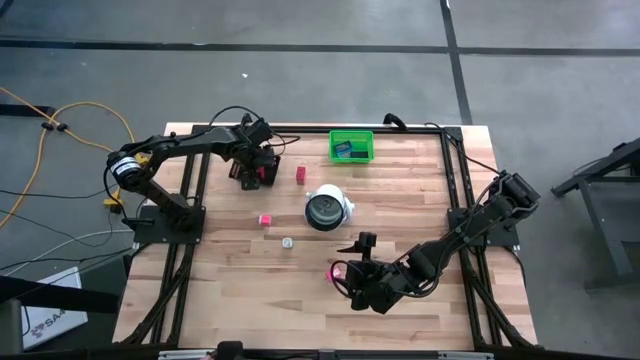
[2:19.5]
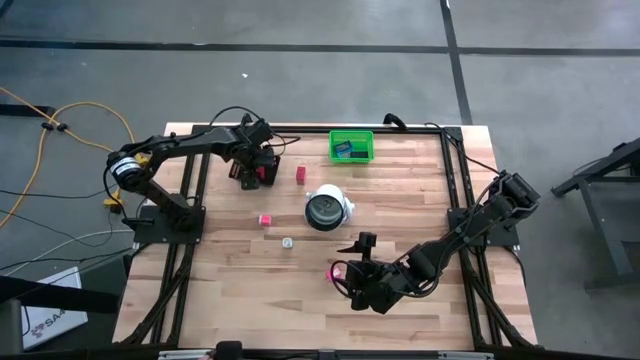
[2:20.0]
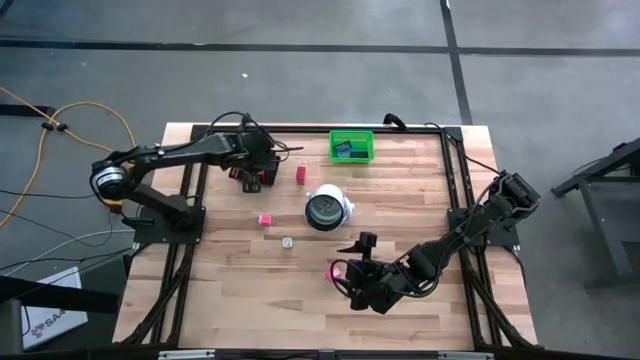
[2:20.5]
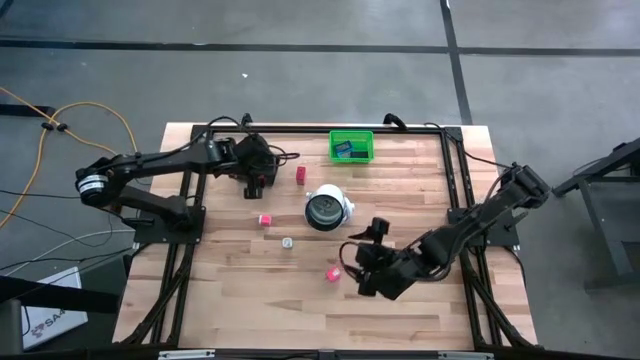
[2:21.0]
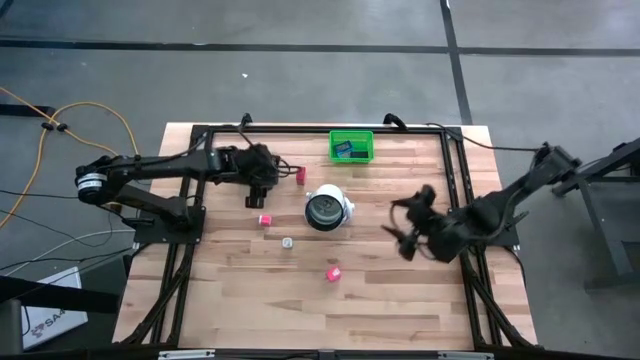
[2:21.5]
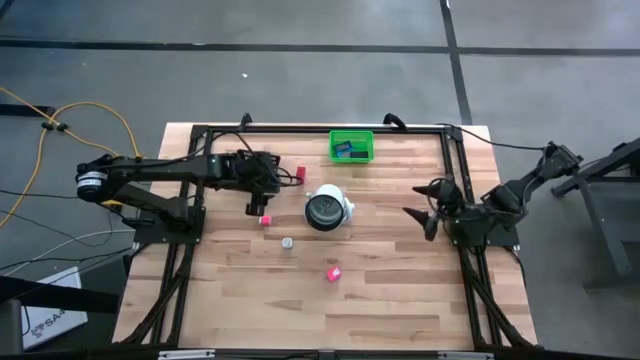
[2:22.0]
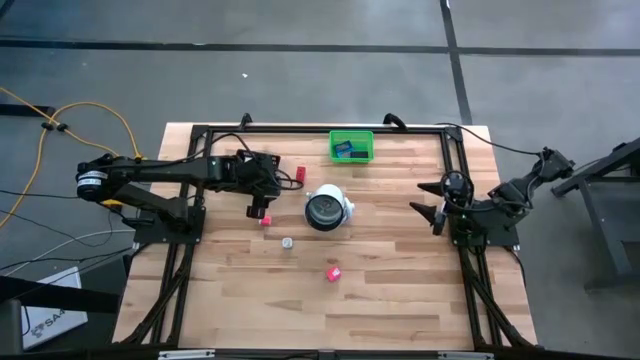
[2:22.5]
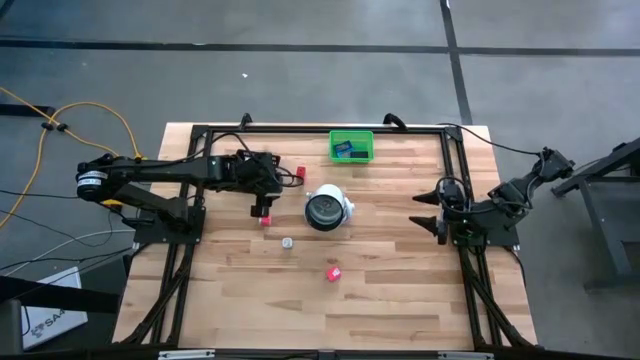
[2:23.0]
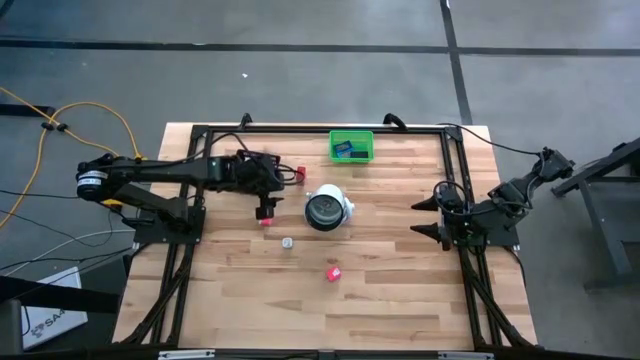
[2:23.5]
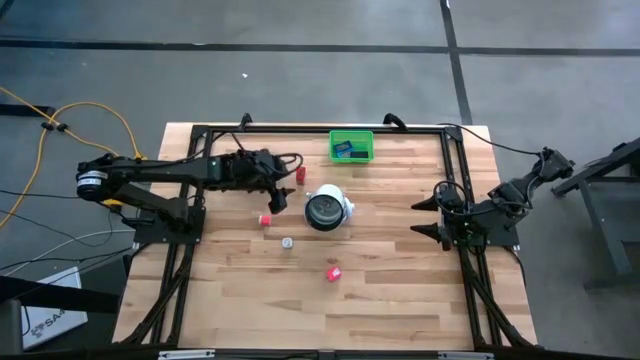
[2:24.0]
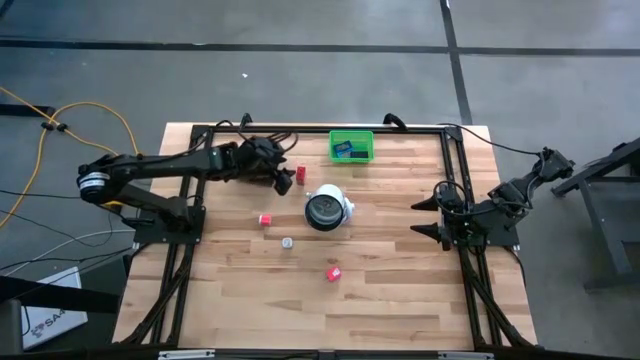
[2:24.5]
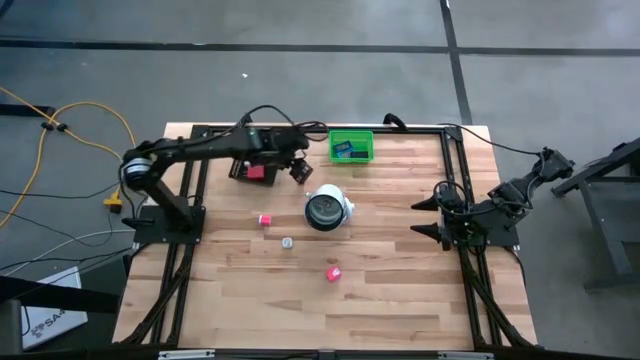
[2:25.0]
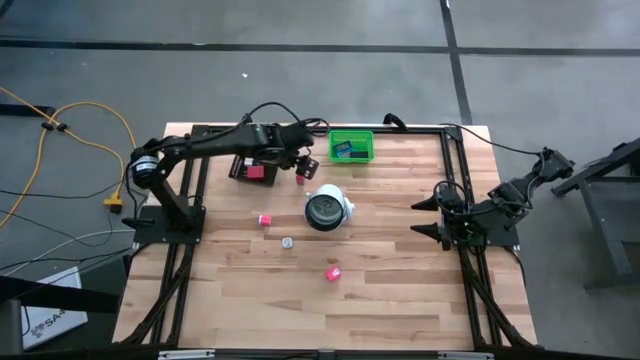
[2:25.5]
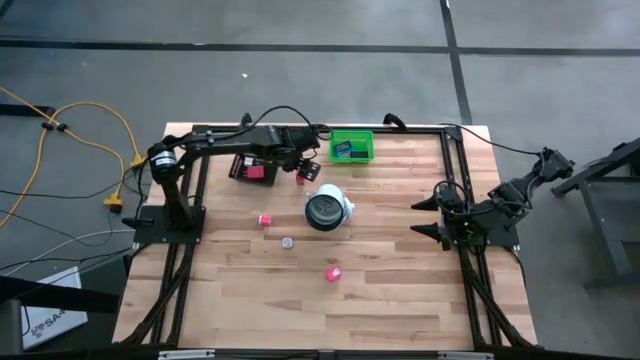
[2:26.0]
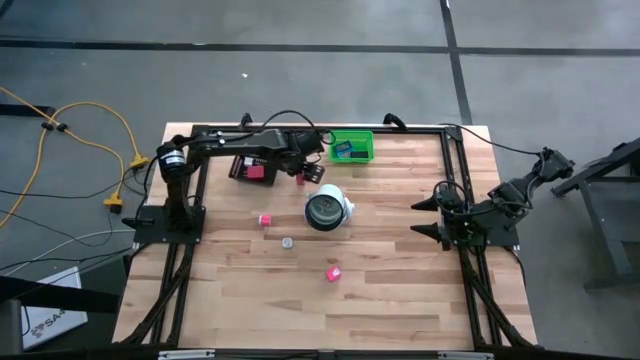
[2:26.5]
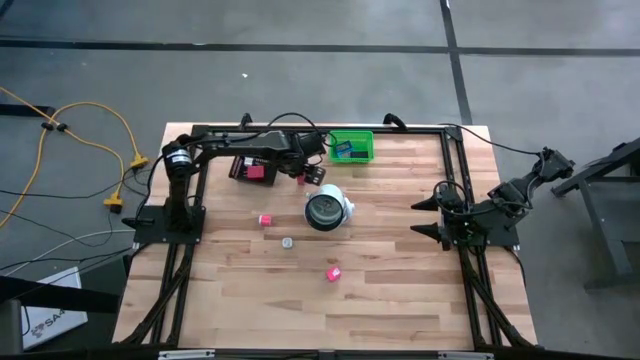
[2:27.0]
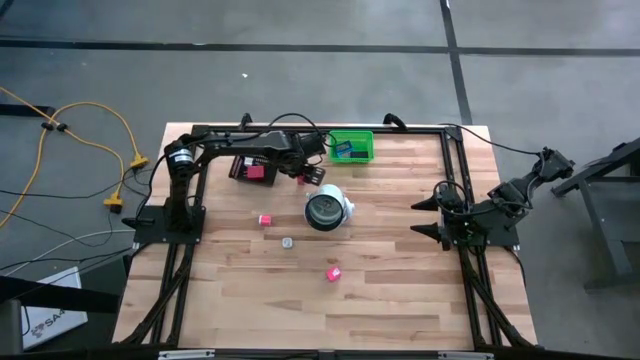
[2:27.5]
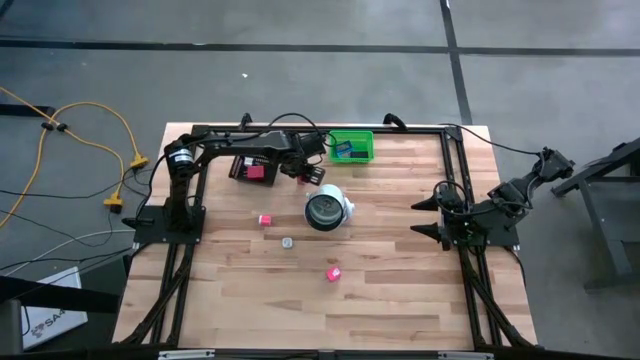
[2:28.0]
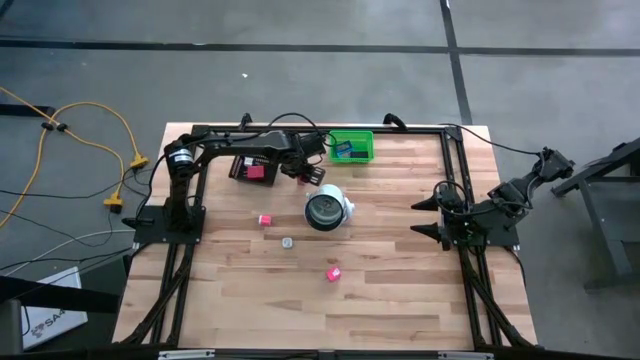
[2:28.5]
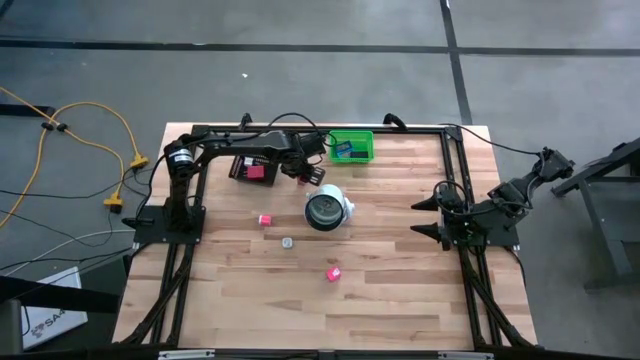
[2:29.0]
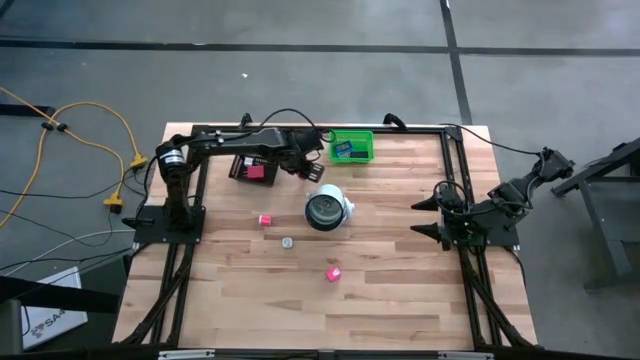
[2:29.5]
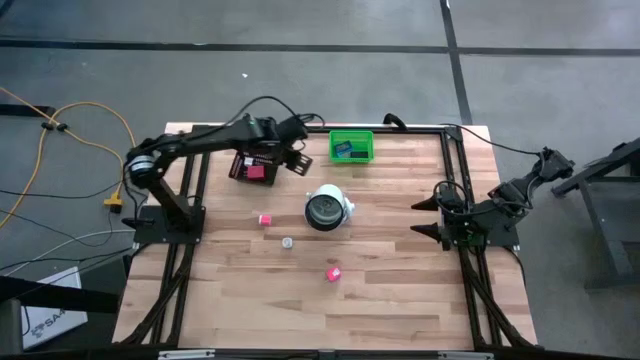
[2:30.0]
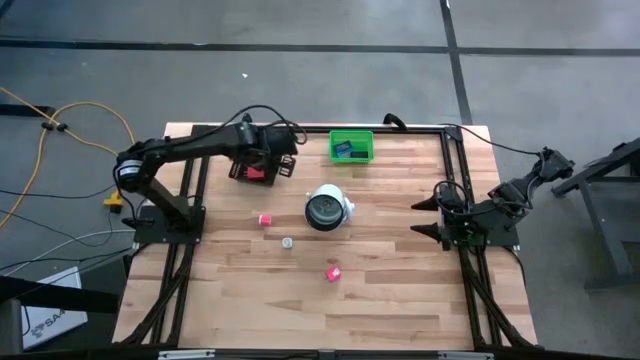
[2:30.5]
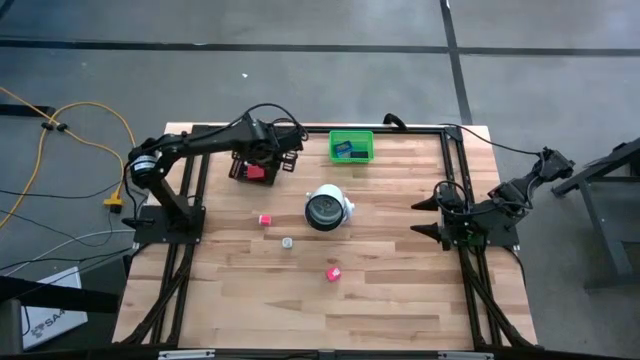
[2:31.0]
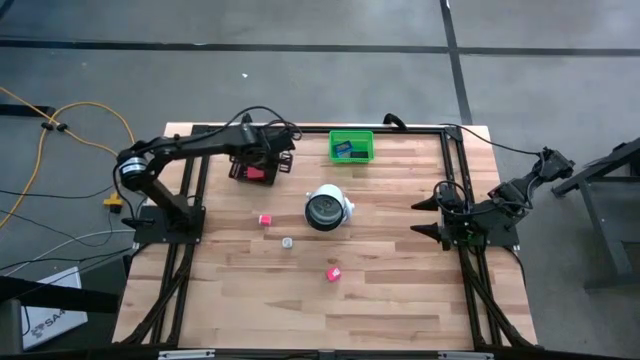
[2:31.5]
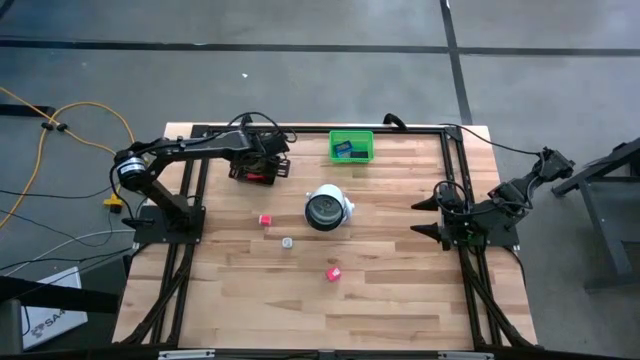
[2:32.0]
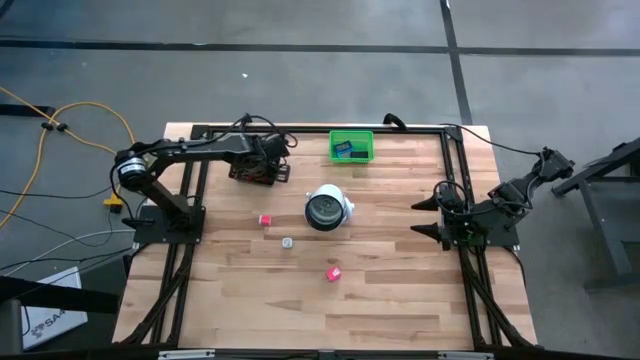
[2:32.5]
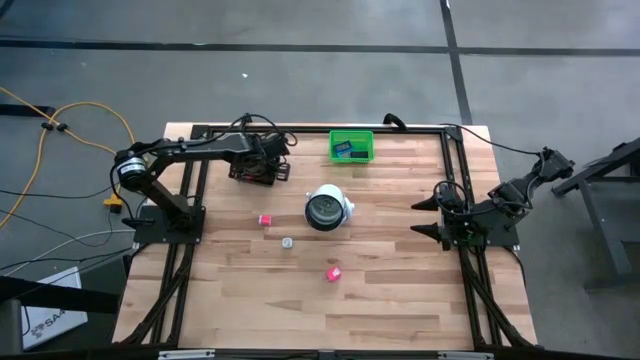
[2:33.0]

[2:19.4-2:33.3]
Task: Pick & Place Office items
Put the red charger adapter into the black bin

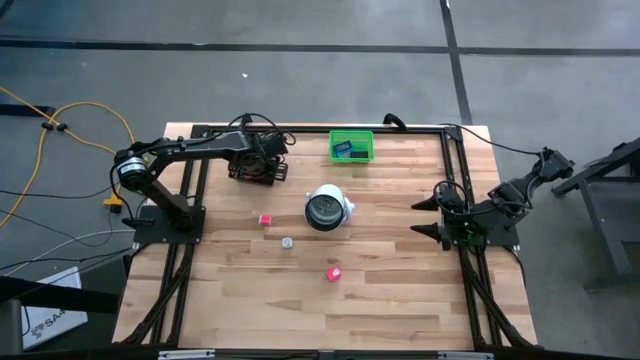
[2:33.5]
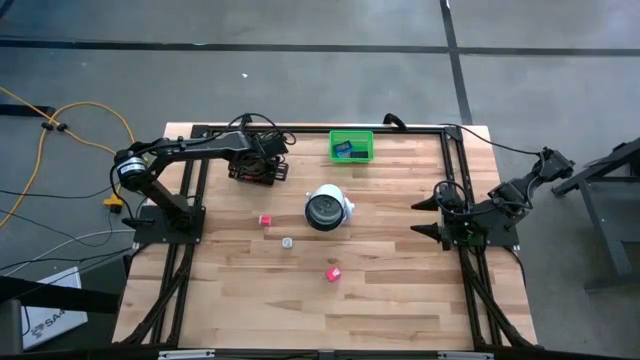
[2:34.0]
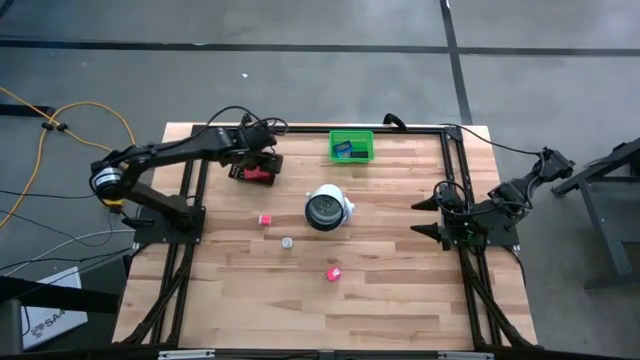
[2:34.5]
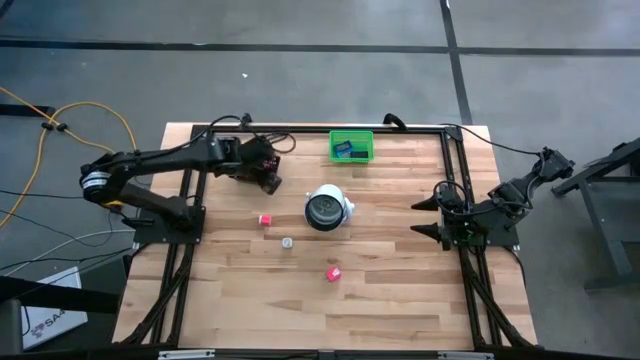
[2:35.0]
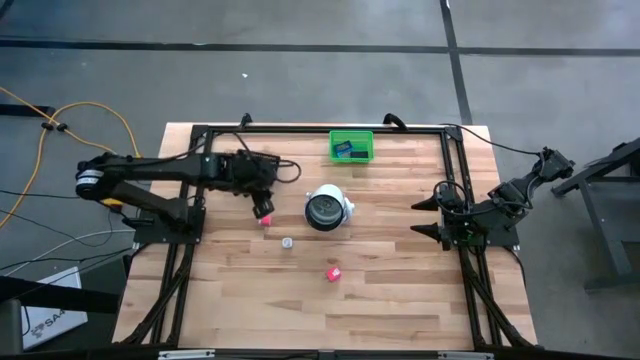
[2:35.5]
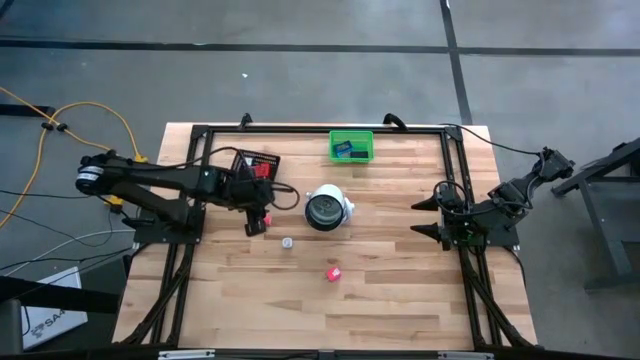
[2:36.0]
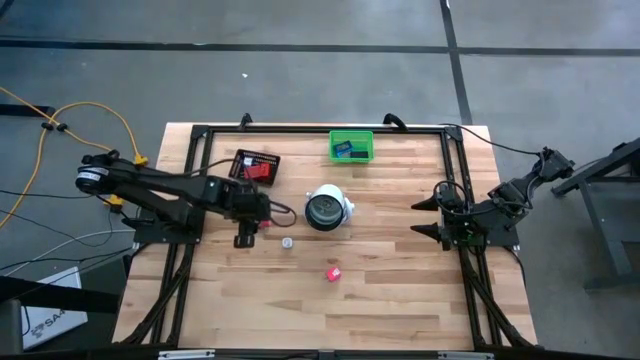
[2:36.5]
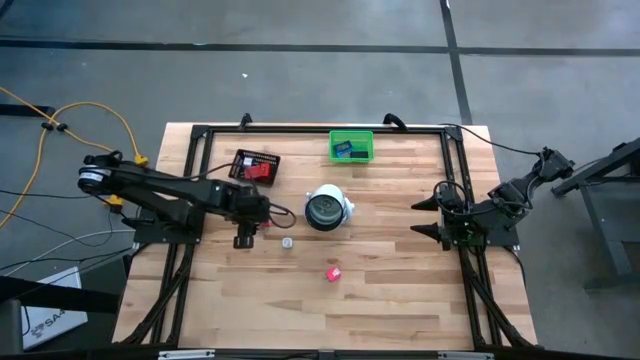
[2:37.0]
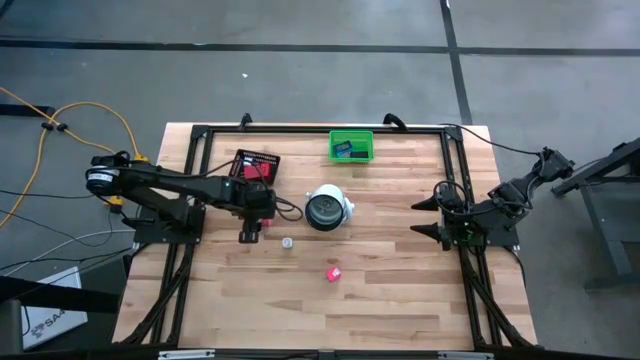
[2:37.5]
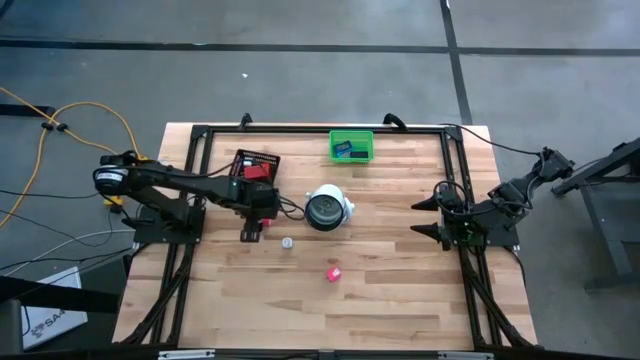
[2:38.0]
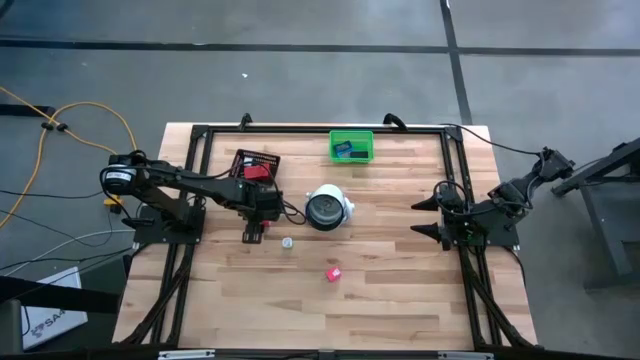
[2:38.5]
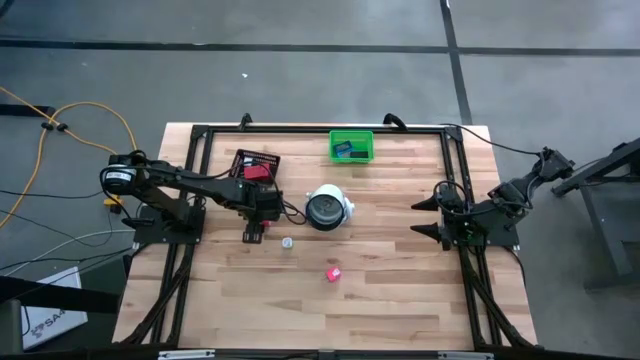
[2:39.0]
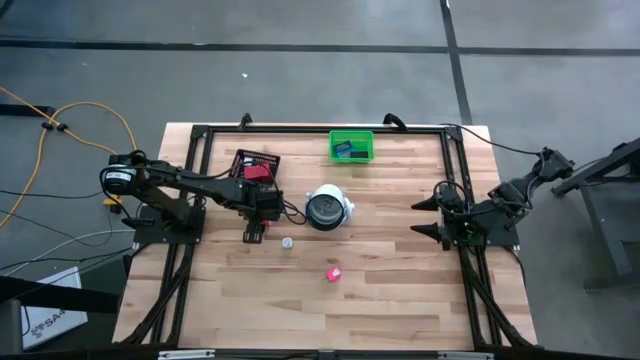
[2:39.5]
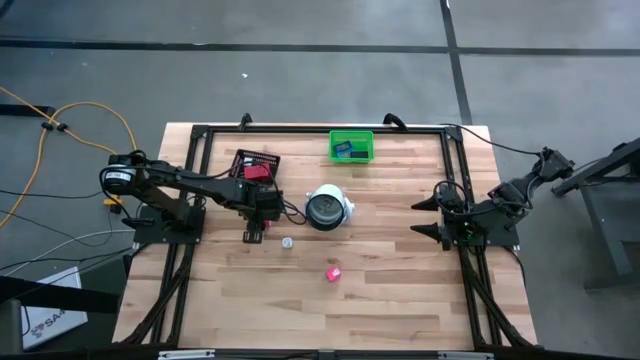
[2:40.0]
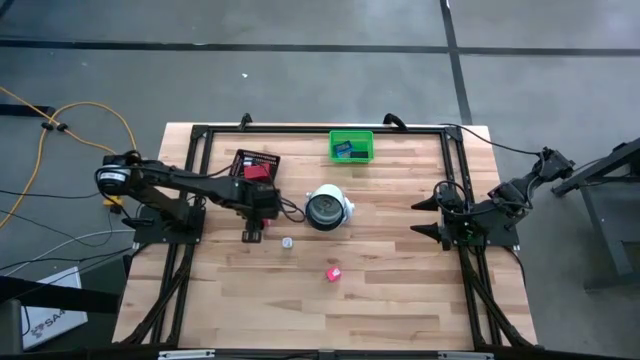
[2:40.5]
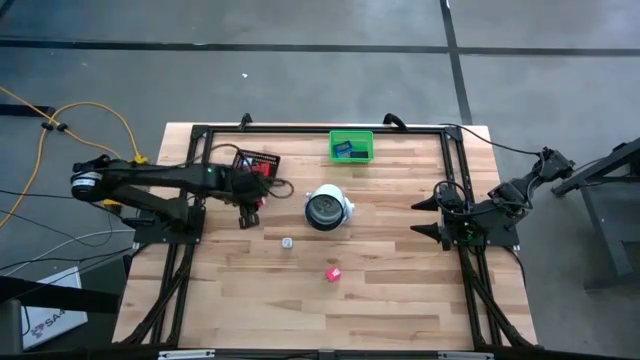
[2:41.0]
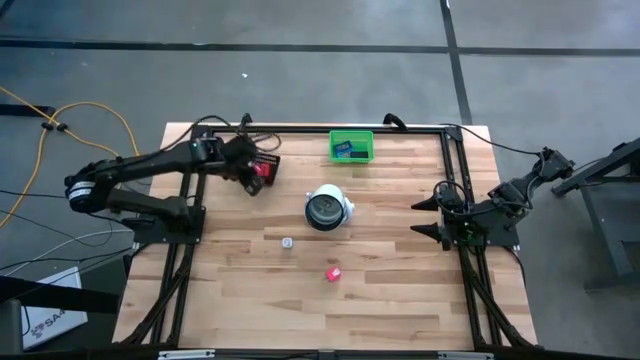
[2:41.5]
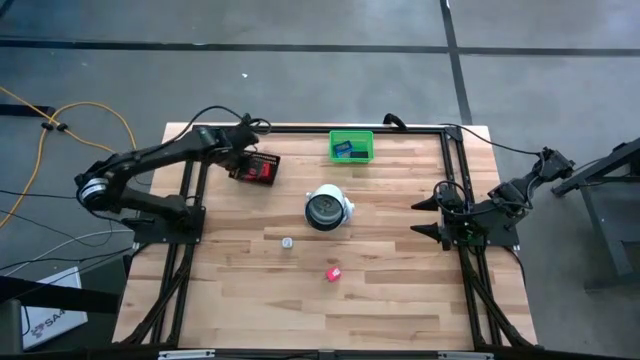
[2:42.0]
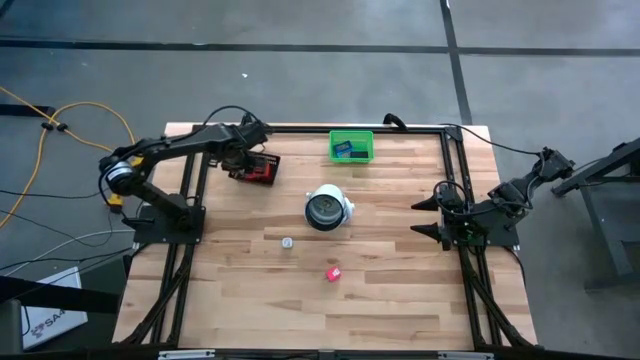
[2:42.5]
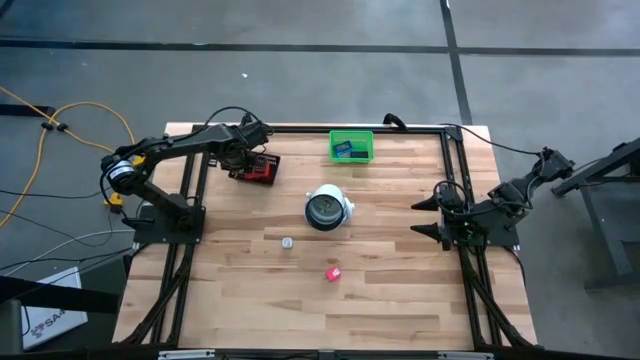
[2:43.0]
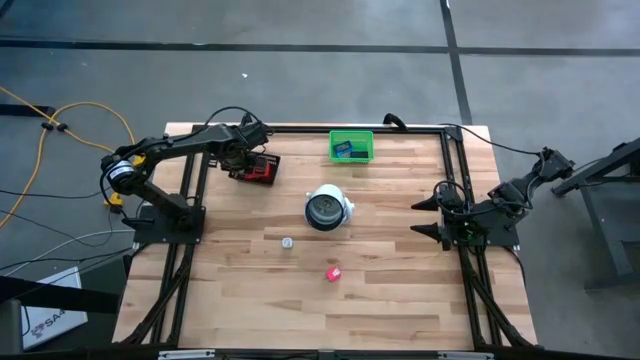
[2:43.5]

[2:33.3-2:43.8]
Put the top pink charger adapter into the black bin
